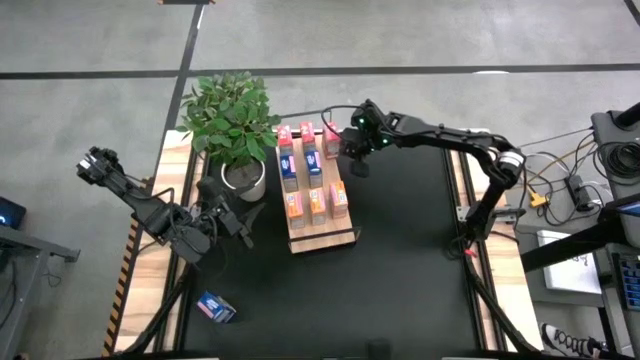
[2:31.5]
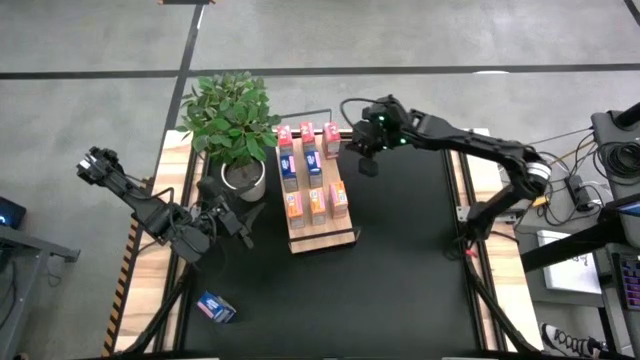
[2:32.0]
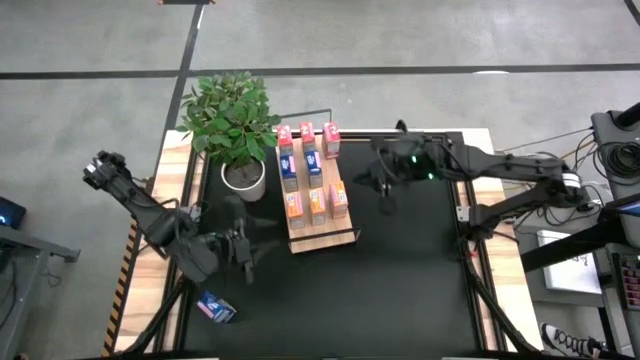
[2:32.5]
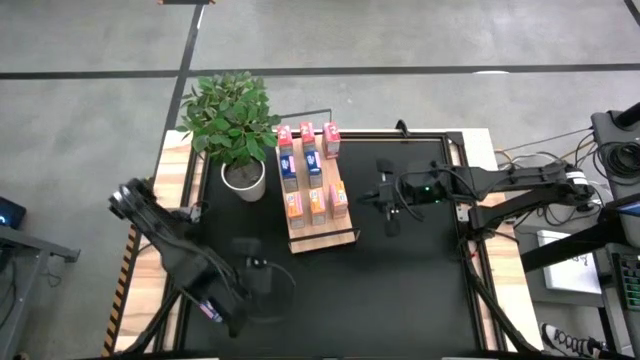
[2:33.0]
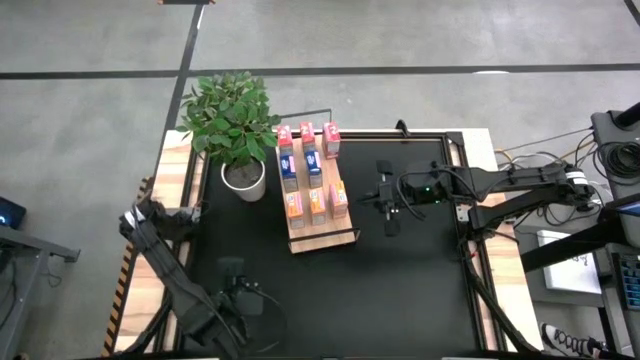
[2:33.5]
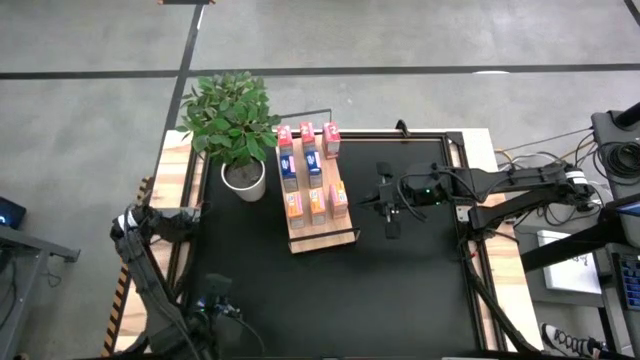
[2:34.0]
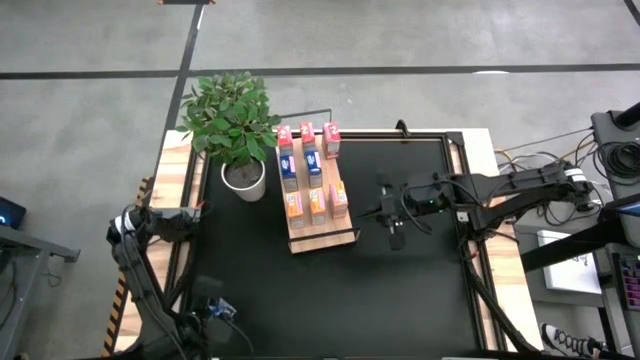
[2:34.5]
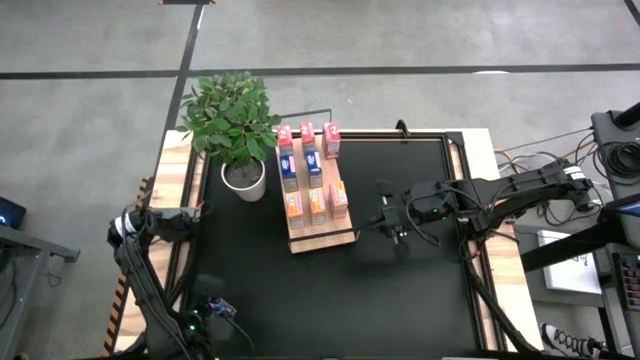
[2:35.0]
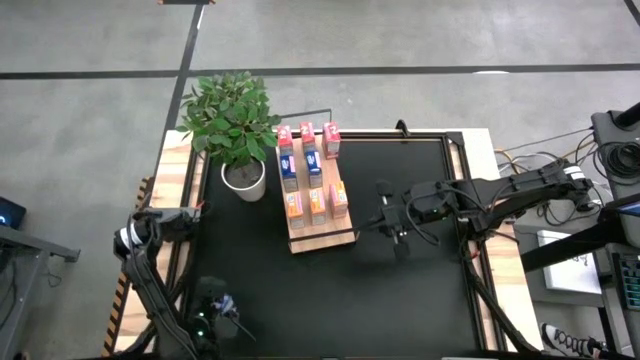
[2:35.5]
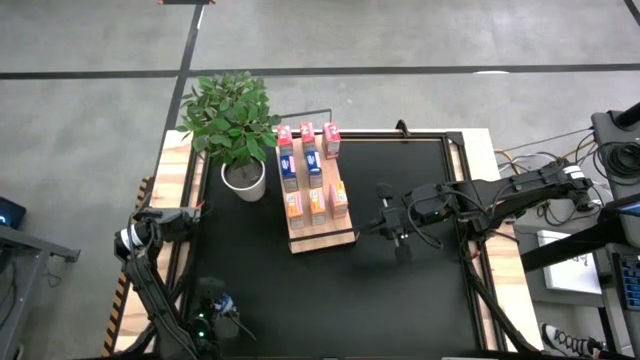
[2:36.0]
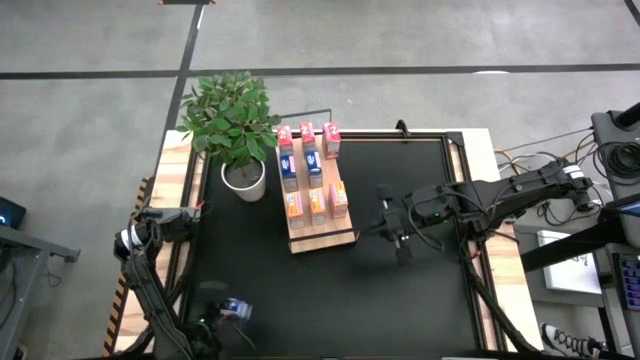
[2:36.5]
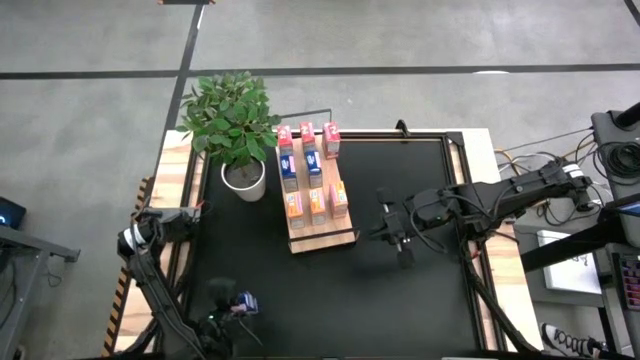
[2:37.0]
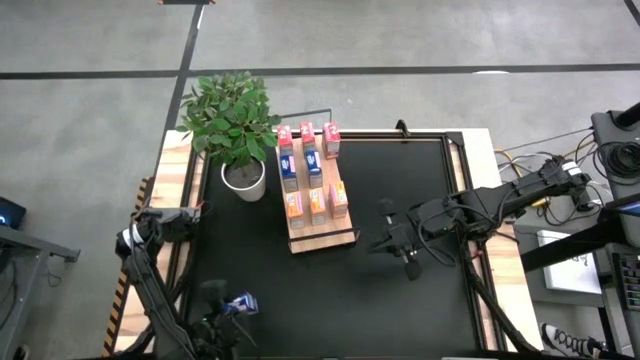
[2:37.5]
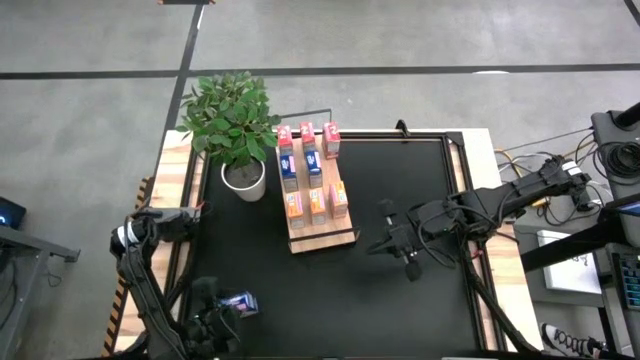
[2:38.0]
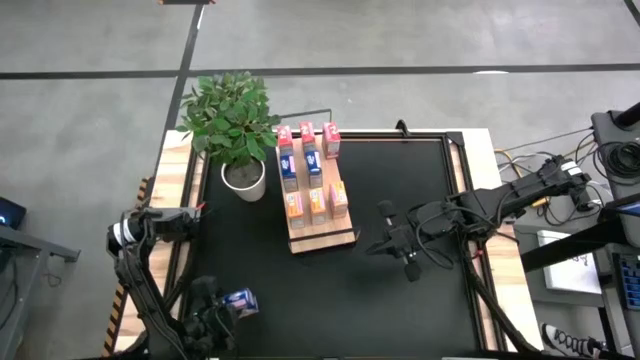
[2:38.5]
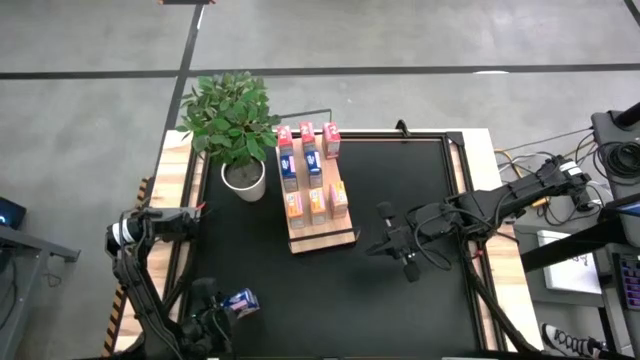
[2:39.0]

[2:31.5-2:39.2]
Task: Stack cereal on shelf
Put the blue cereal box on the shelf aligned with the other blue cereal boxes

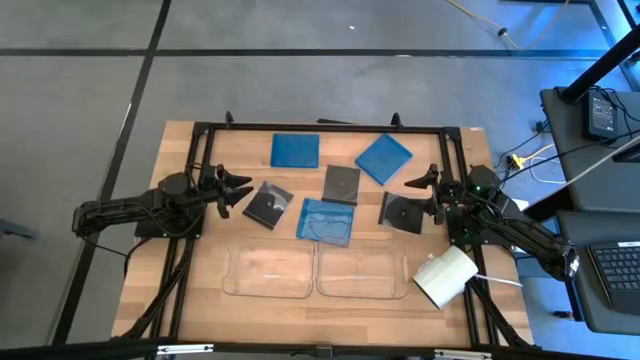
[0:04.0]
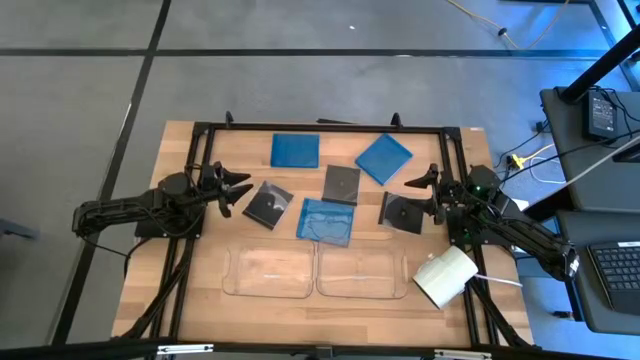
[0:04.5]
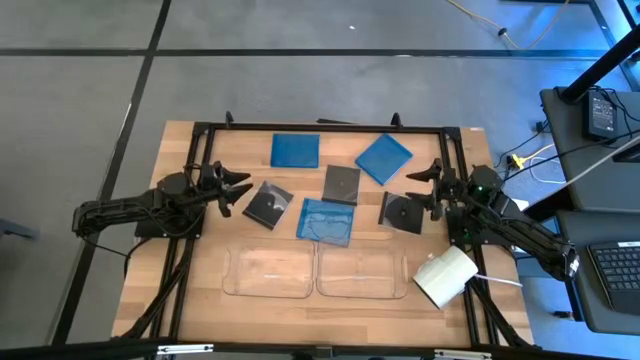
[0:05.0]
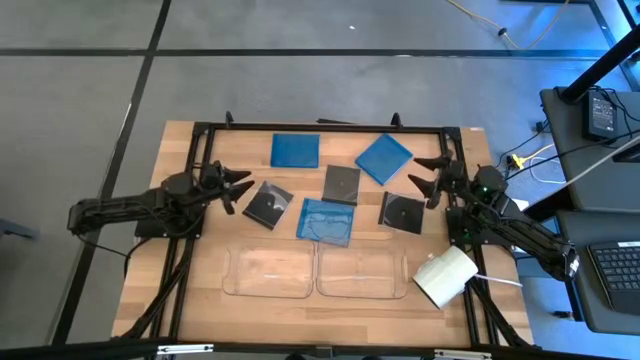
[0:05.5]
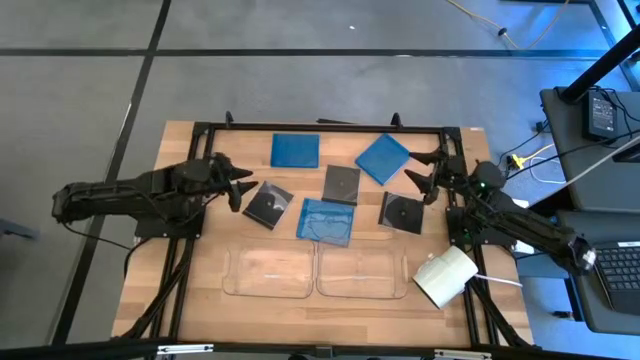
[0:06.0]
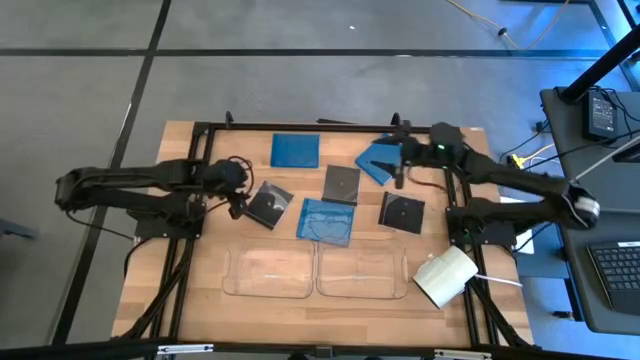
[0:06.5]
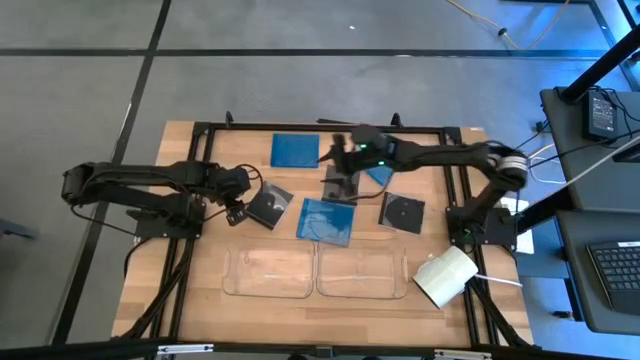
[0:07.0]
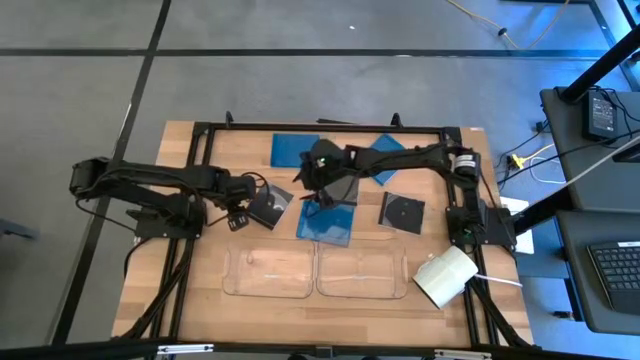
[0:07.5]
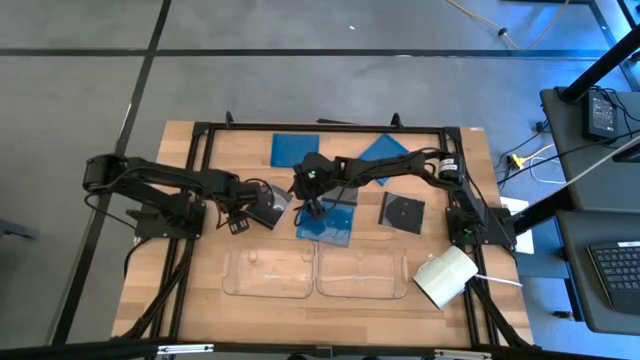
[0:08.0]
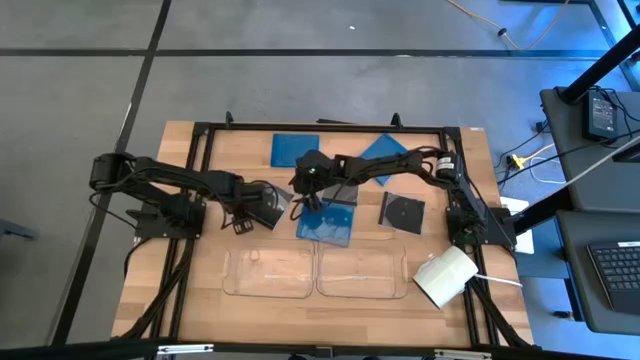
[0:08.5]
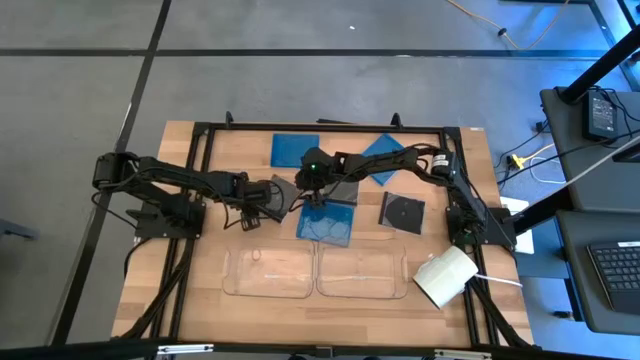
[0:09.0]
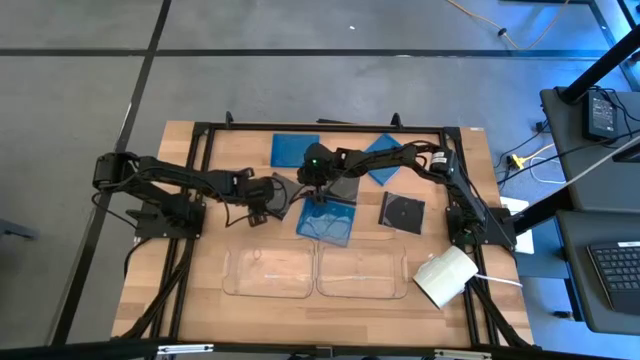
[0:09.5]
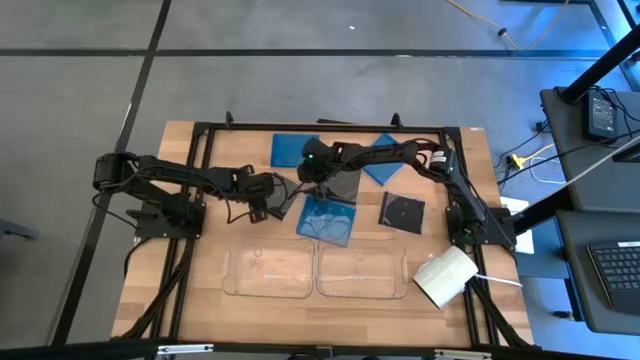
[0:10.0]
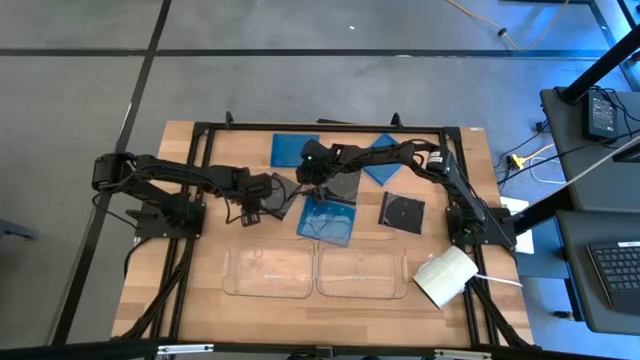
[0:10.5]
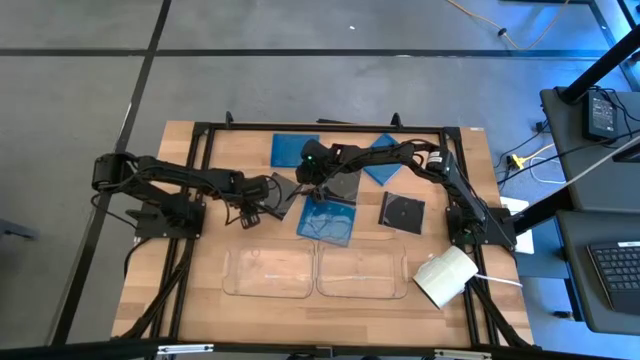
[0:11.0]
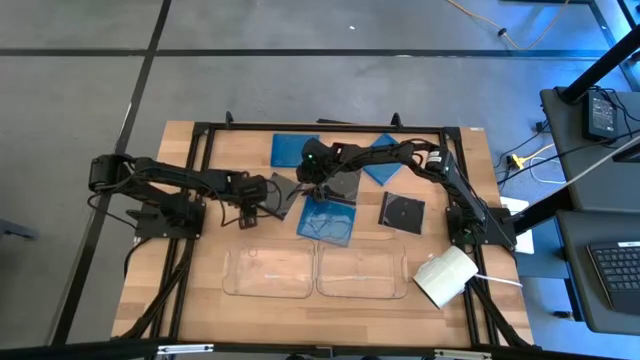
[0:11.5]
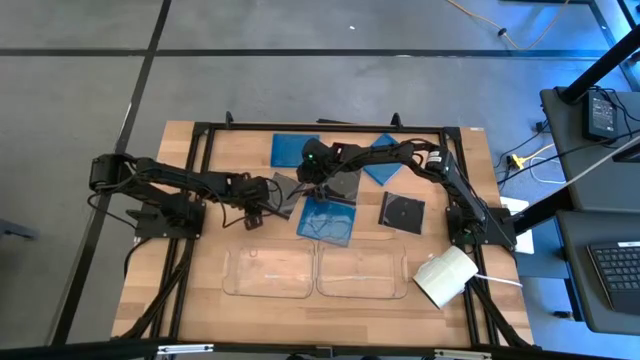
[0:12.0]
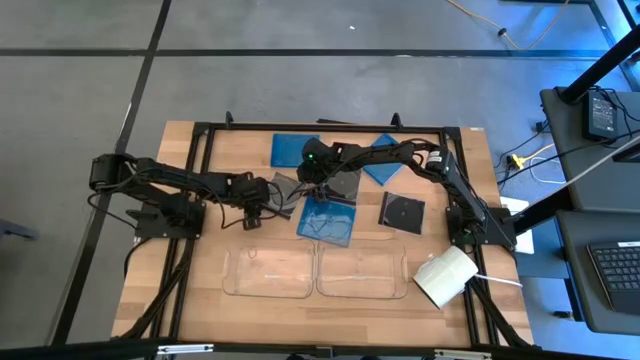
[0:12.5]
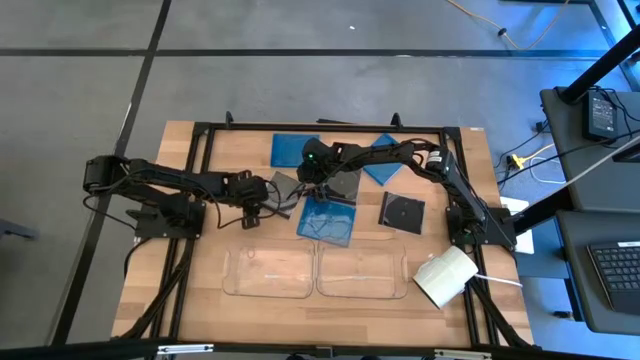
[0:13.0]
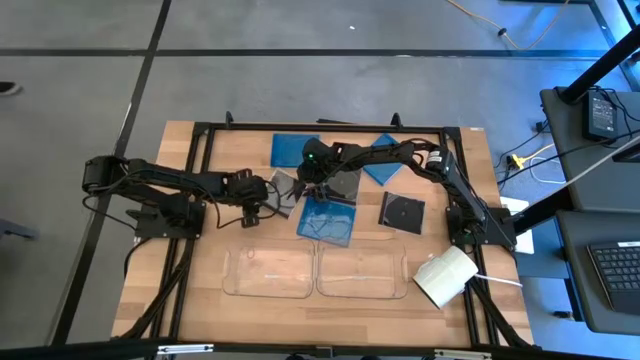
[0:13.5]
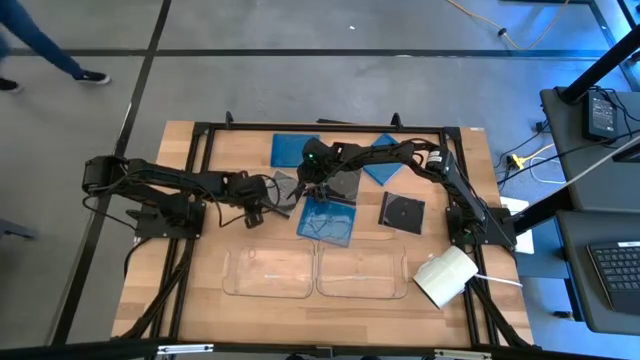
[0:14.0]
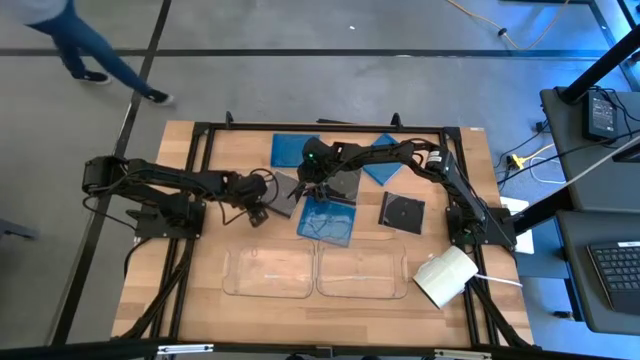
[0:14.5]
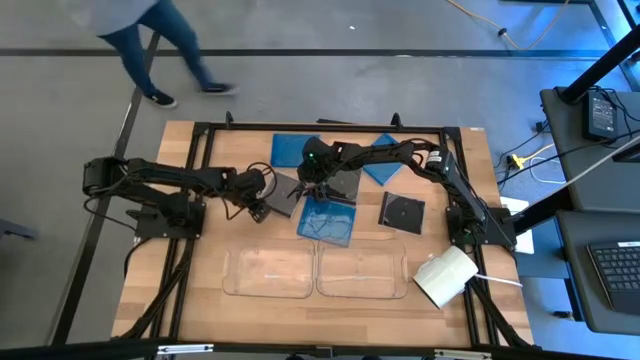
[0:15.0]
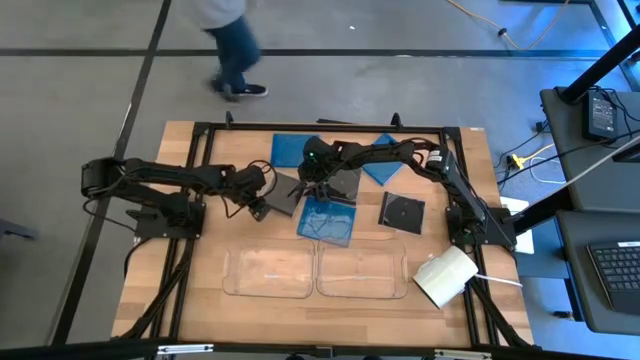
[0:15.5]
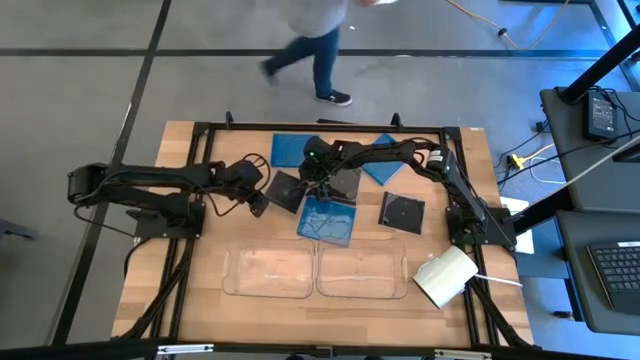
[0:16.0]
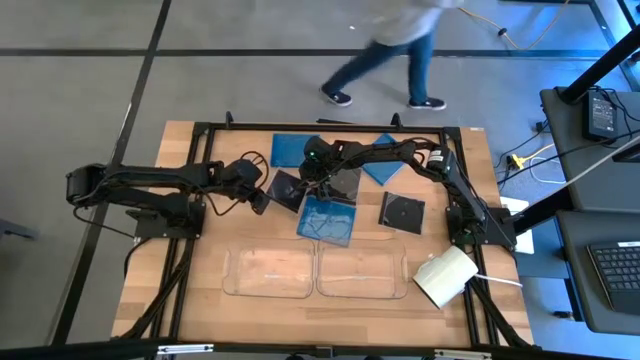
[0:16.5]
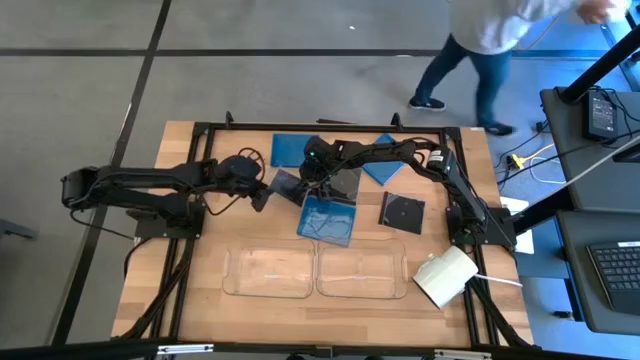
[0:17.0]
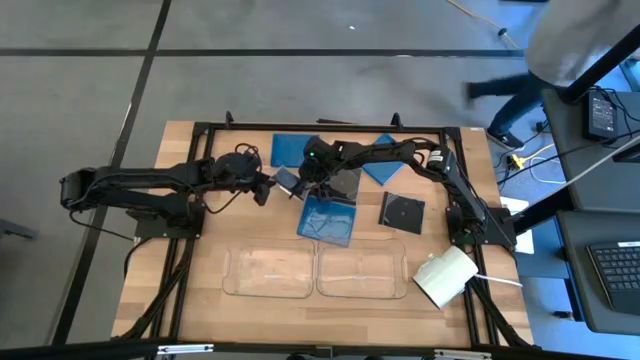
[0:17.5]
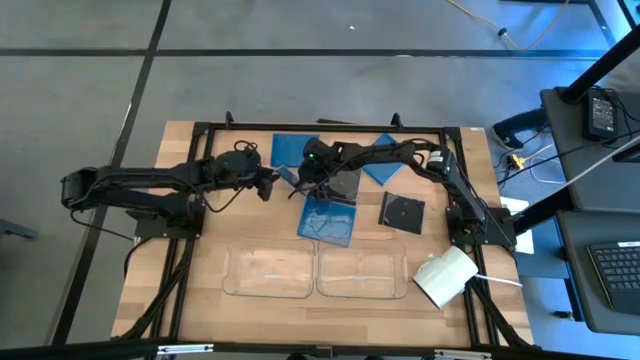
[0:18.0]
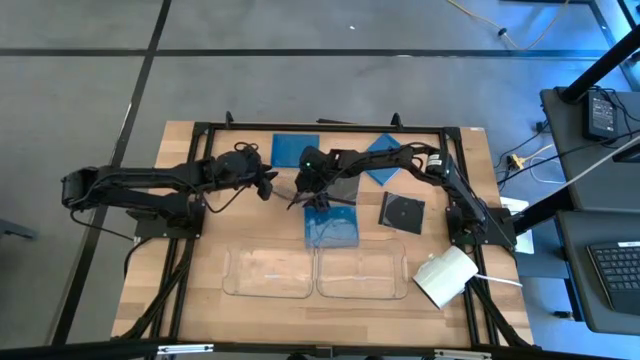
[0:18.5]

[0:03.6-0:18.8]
Task: Pick & place jewel cases by type
Put the left black CD case into the left transparent bin
